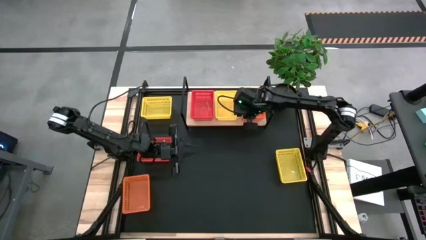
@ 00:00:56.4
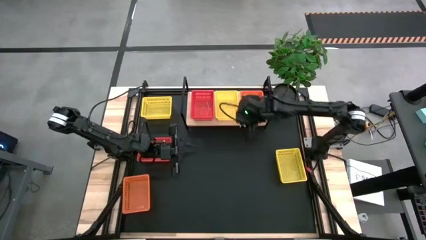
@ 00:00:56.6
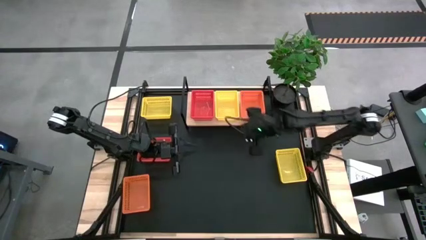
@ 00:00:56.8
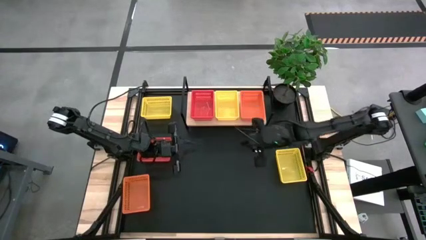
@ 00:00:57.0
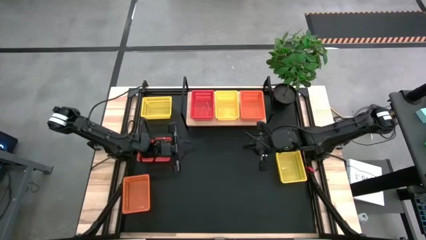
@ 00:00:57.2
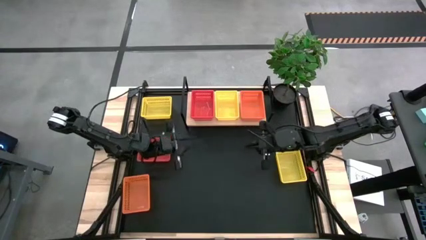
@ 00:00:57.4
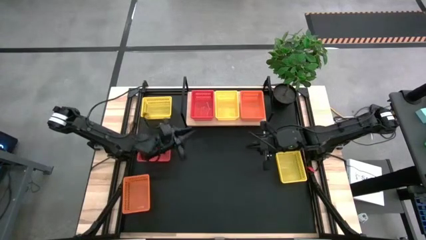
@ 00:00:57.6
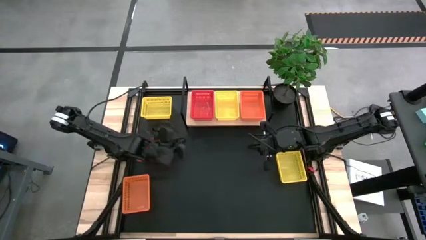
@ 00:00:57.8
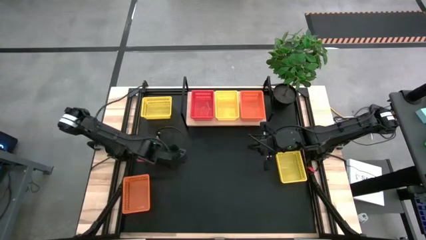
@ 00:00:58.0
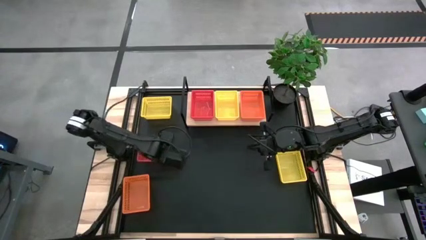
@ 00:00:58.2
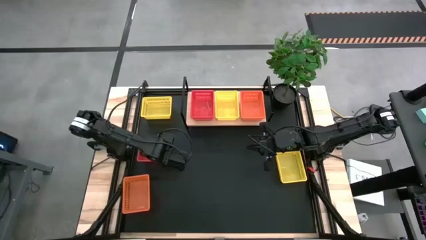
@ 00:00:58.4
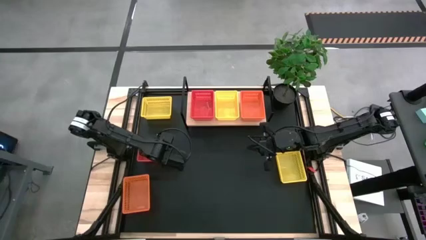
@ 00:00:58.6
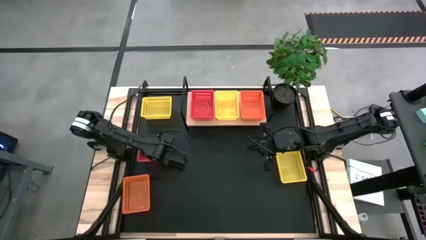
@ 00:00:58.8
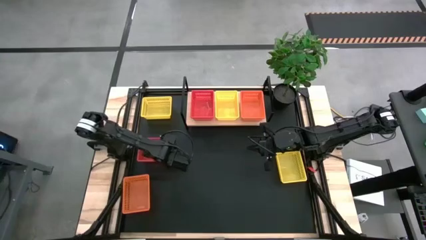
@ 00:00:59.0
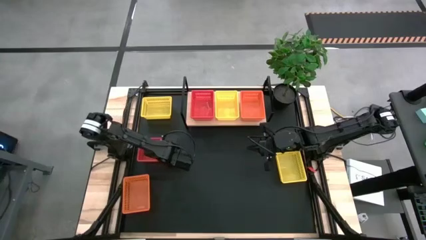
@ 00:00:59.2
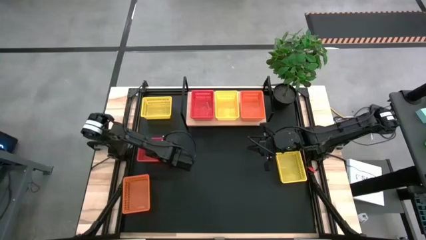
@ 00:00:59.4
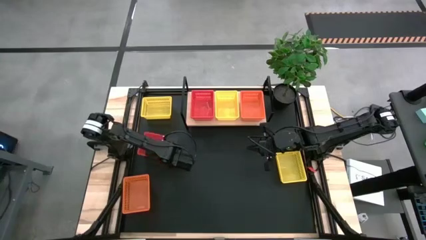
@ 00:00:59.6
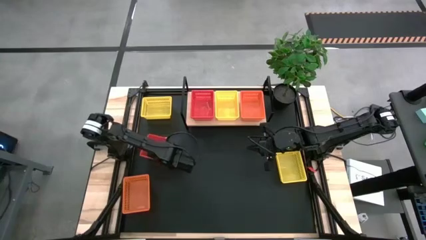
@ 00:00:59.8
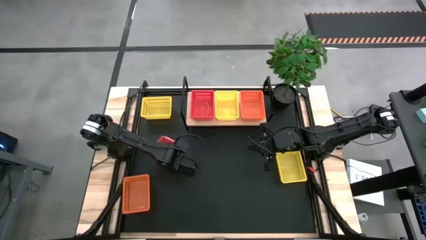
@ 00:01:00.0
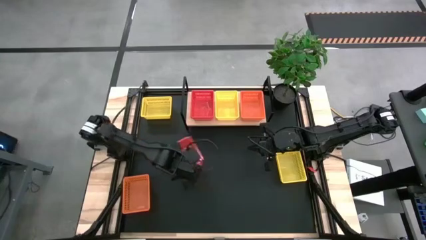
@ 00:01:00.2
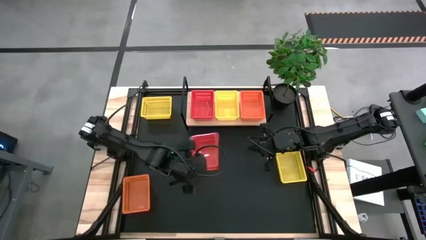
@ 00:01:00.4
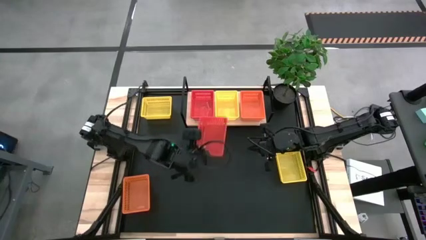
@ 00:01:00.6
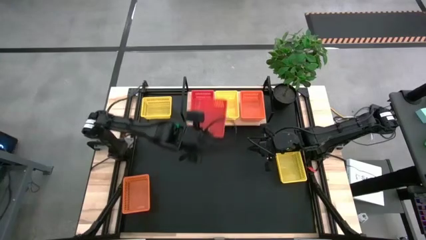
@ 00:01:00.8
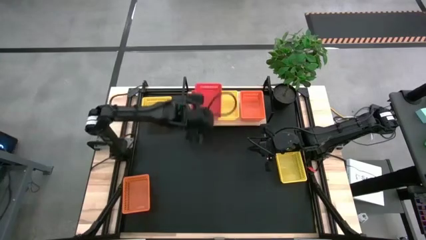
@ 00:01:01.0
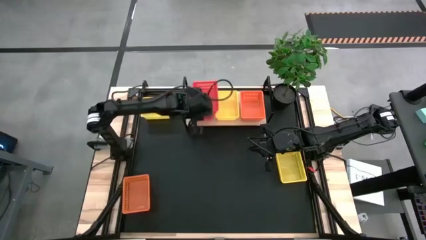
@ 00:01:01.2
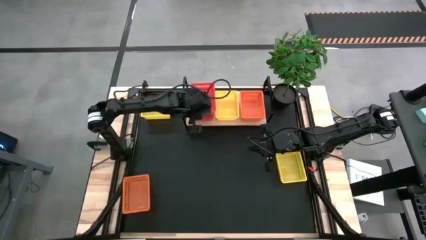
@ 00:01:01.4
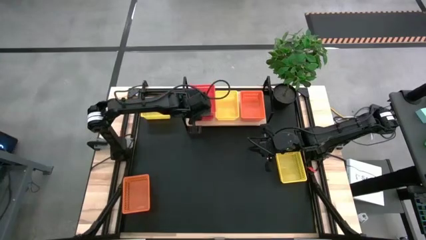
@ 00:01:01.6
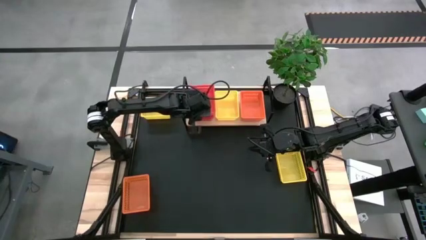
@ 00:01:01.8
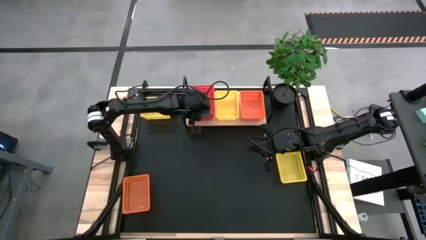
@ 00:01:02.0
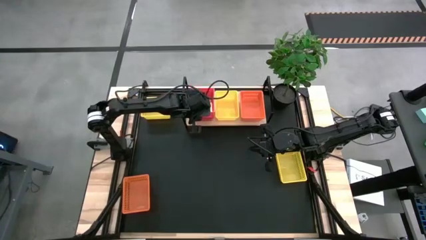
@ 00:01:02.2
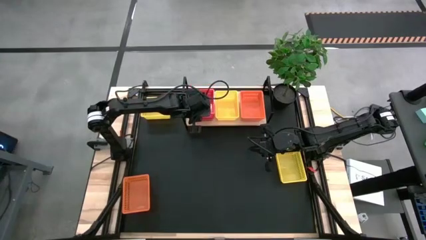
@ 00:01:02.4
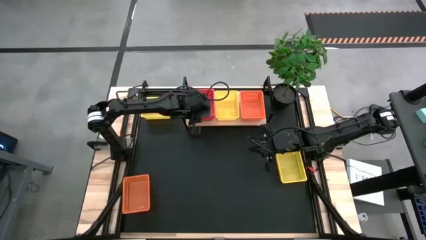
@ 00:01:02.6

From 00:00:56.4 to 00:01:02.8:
Task: Stack baskets on shelf by color
Stack the red bin on top of the red bin on the shelf

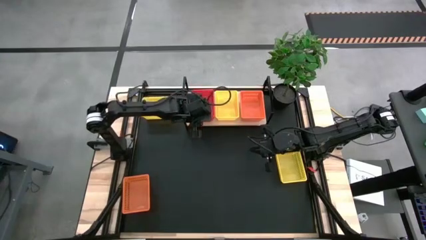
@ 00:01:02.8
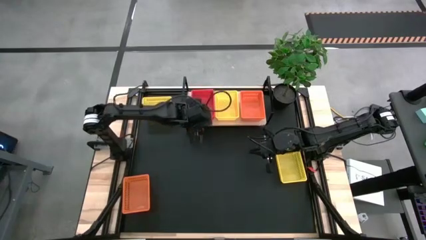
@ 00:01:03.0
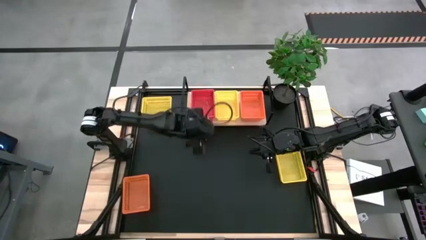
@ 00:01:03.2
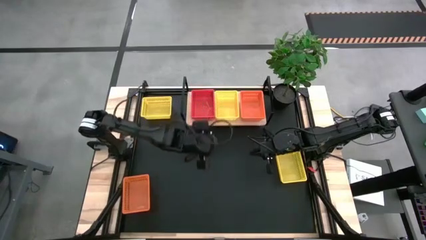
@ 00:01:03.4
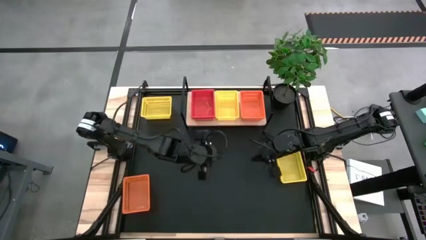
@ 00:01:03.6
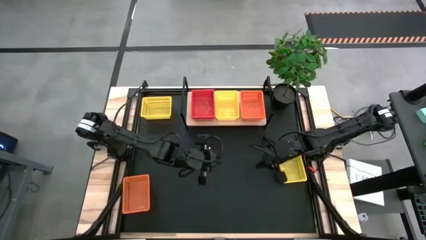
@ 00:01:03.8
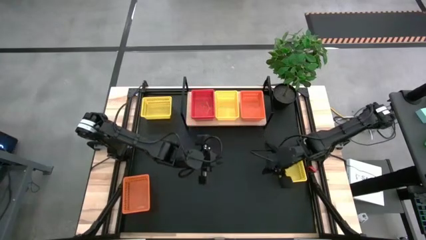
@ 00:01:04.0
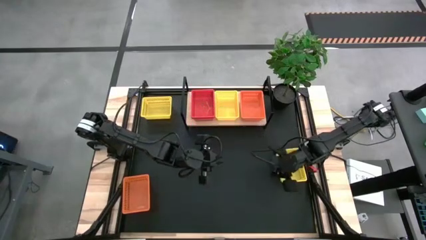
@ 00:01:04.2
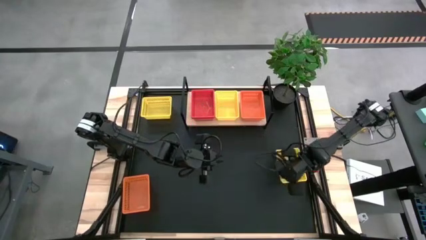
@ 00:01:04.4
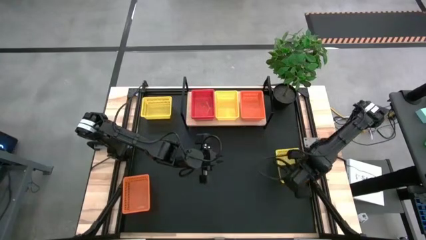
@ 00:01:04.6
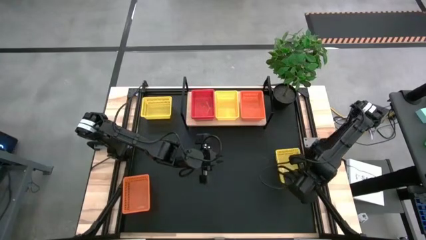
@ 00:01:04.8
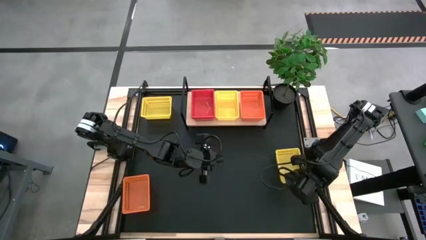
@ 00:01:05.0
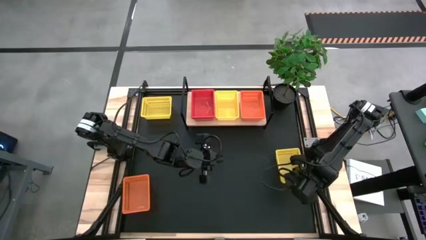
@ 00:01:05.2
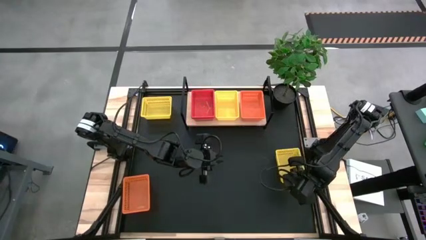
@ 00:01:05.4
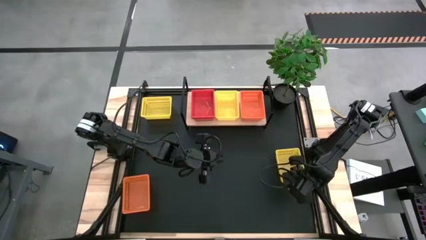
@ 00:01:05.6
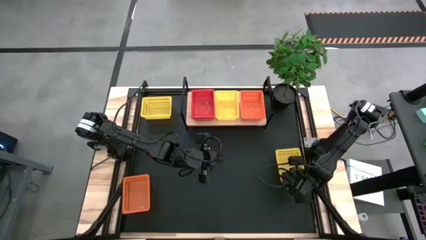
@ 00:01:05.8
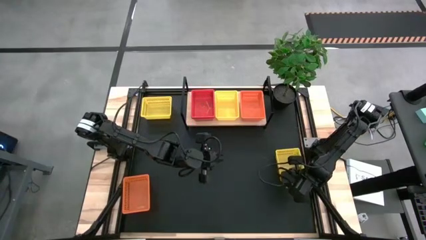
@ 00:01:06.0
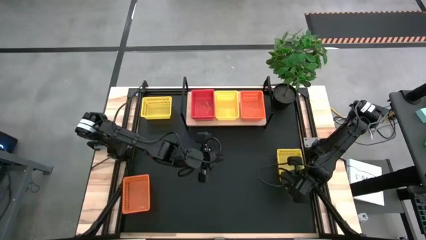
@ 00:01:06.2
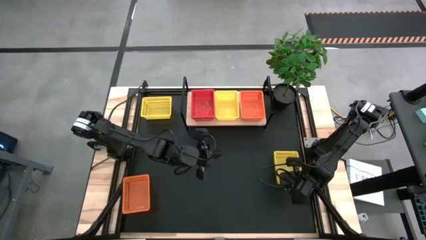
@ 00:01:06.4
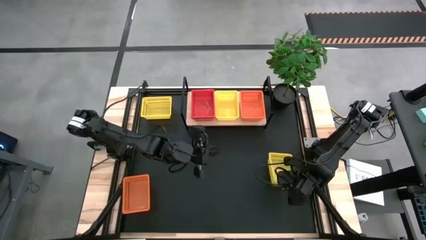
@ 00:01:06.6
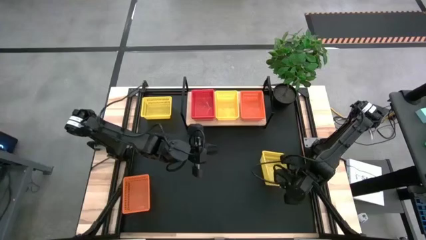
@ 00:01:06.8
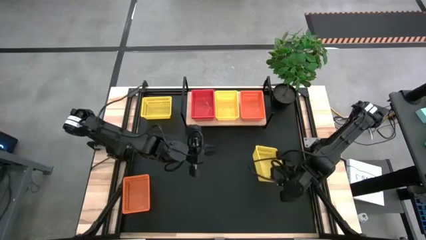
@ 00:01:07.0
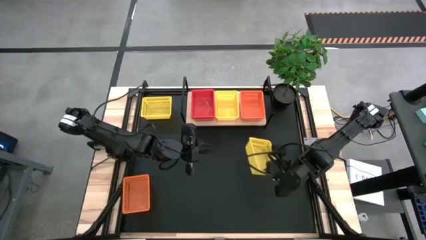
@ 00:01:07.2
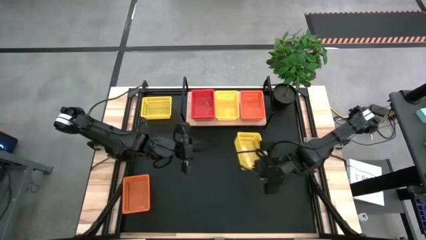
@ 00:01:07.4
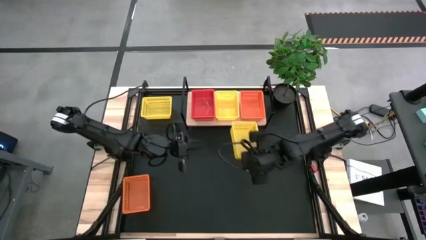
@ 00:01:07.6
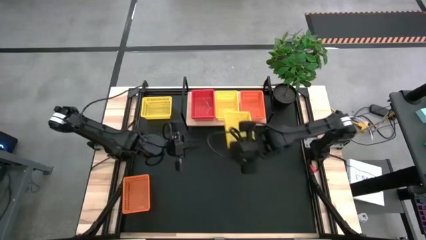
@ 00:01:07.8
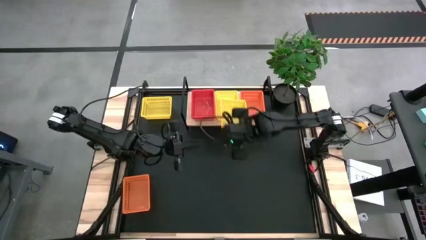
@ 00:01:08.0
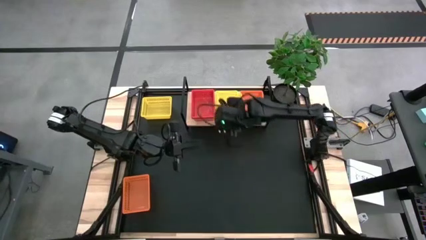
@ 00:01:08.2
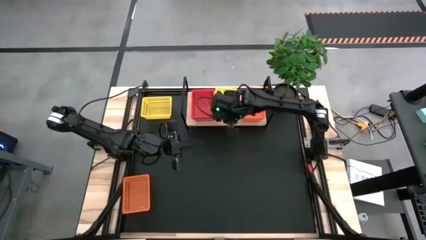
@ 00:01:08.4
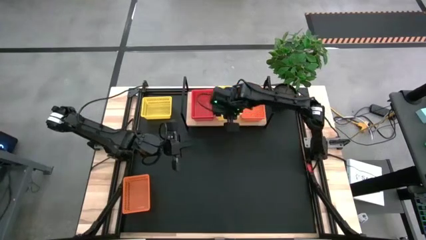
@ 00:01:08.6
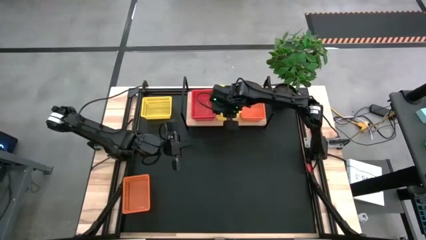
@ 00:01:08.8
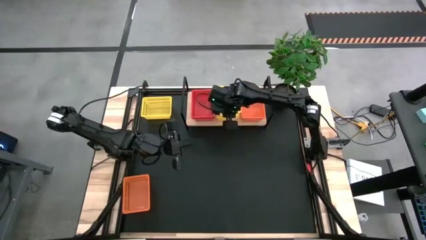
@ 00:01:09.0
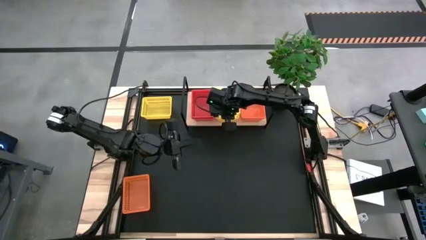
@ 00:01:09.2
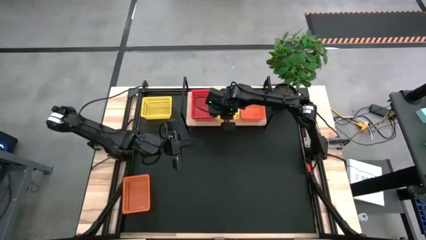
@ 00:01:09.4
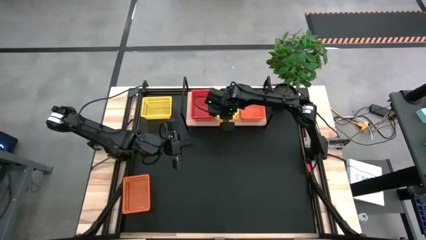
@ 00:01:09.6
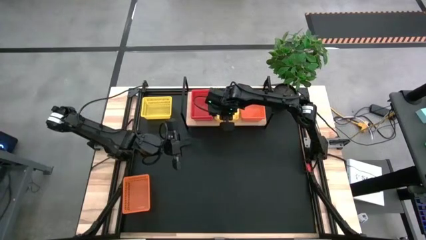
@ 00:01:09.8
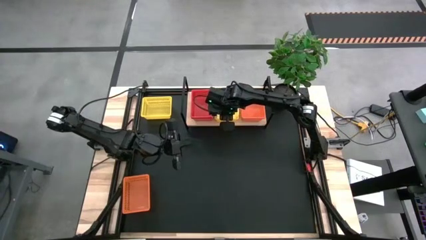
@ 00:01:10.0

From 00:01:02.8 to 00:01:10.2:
Stack the bottom yellow bin on top of the yellow bin on the shelf

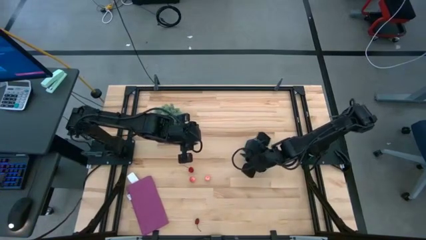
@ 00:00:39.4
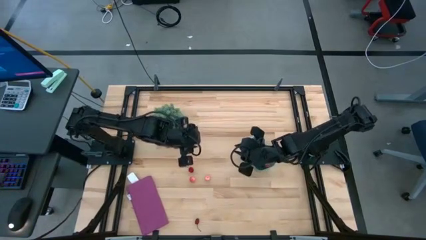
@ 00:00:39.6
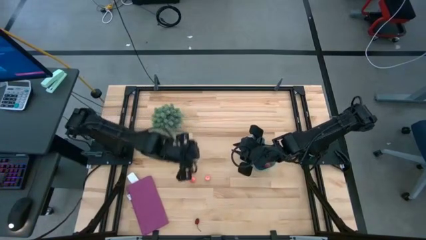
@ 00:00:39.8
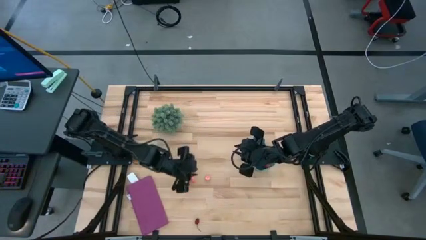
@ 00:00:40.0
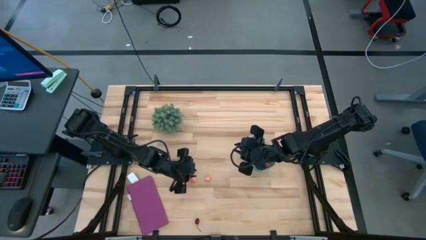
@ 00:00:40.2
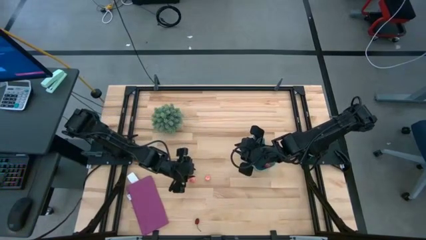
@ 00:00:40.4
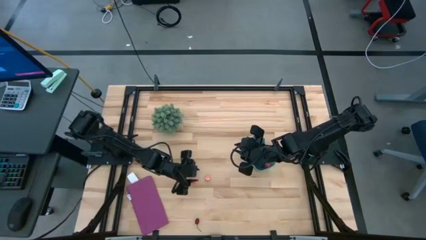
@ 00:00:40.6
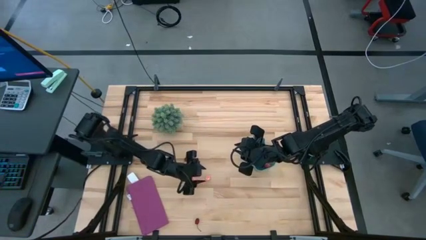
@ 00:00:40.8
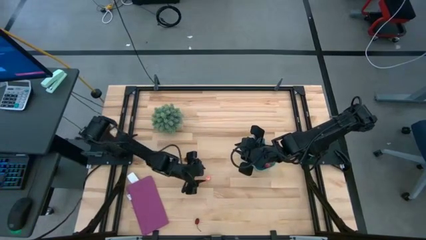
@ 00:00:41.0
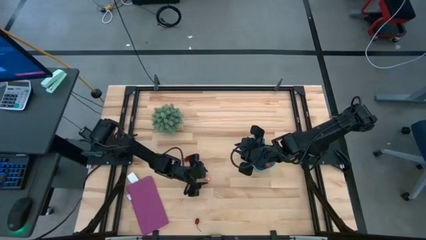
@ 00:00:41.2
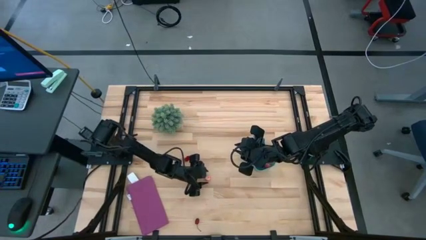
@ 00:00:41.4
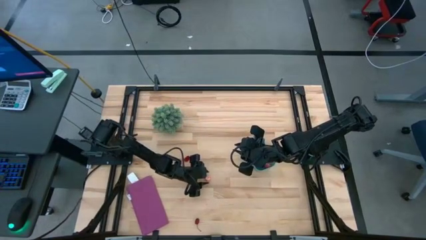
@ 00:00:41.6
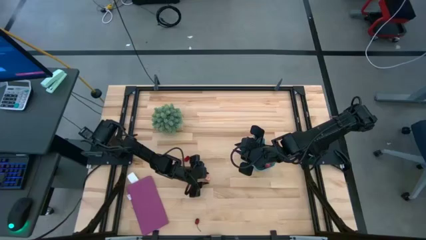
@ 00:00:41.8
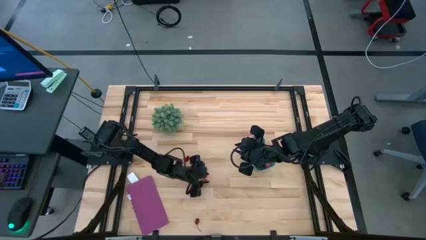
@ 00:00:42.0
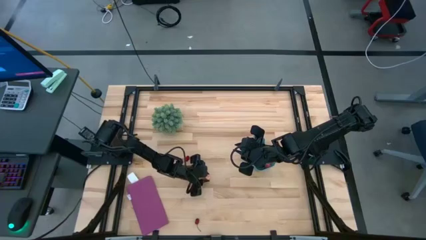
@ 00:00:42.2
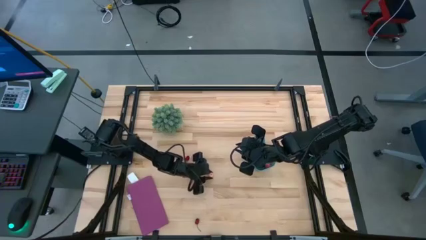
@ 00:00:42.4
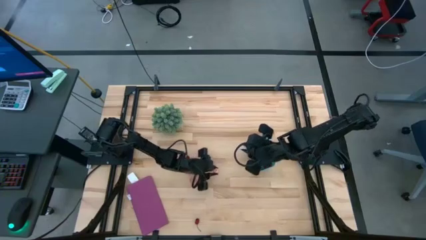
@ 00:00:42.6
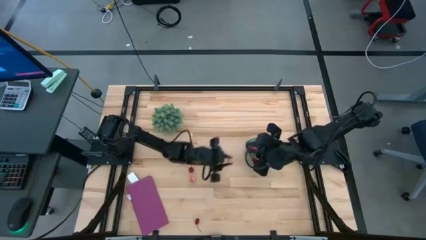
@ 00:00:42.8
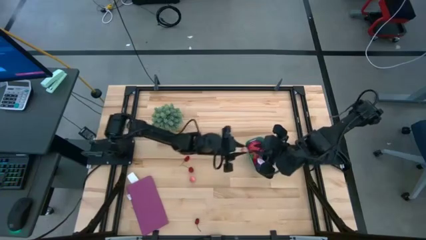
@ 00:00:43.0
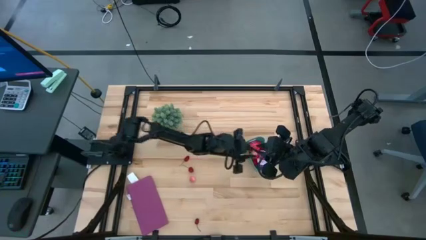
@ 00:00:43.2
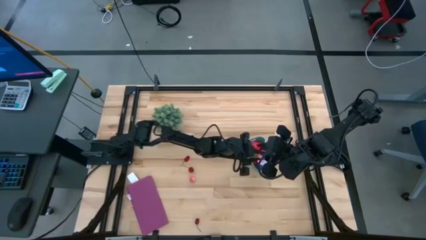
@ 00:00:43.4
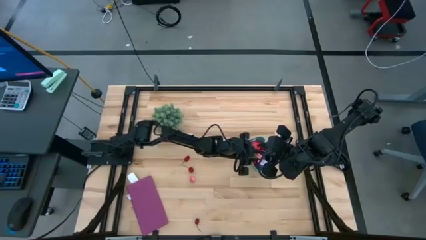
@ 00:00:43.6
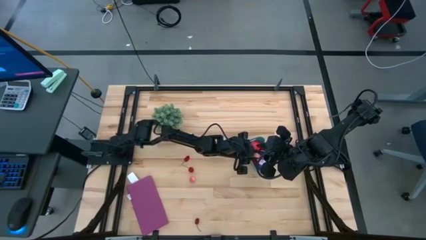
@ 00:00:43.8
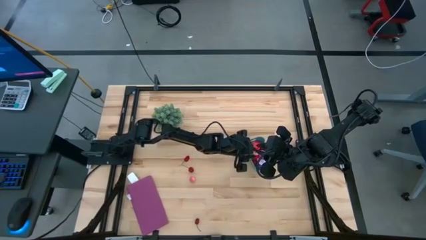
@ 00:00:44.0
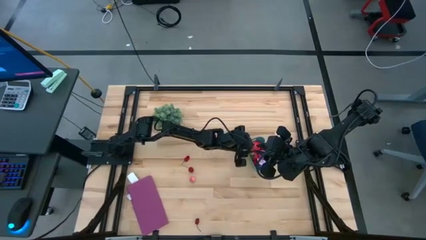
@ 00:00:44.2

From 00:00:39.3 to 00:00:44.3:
Task: Pick and placing Produce into tupperware
Put the apricot in the basket
